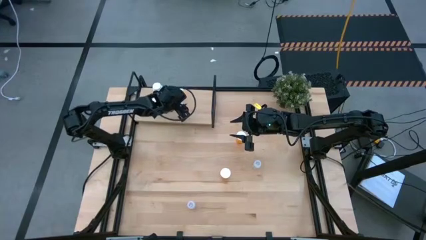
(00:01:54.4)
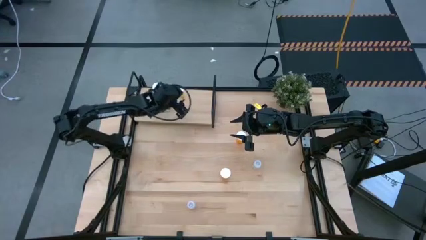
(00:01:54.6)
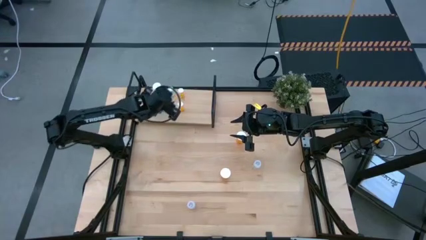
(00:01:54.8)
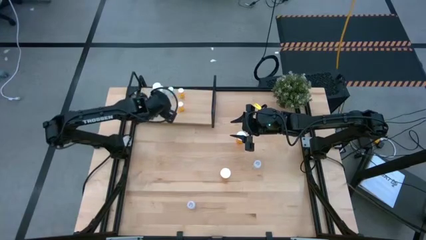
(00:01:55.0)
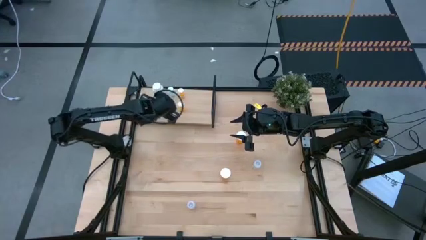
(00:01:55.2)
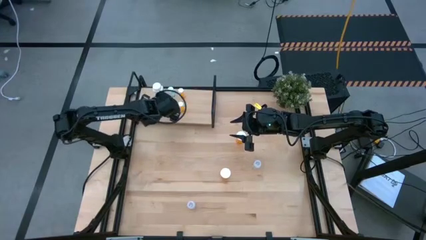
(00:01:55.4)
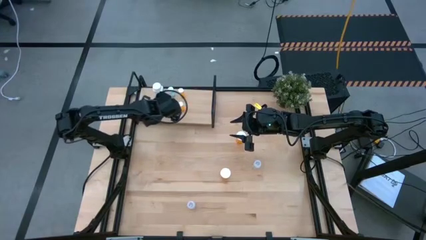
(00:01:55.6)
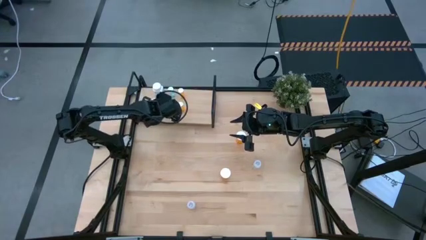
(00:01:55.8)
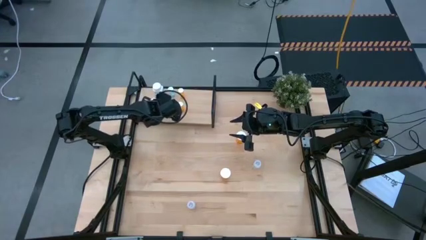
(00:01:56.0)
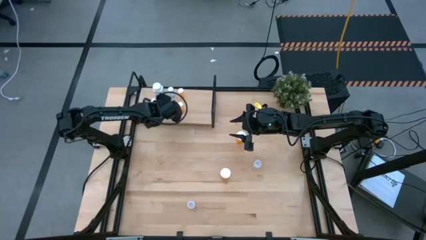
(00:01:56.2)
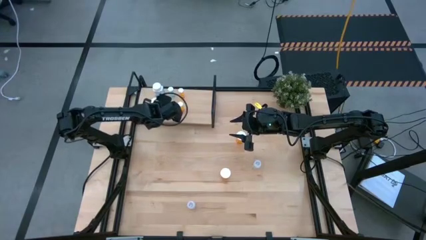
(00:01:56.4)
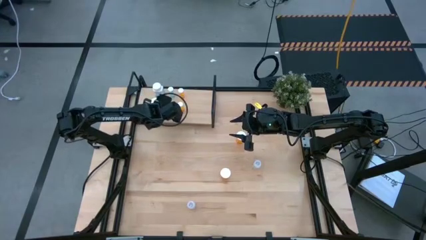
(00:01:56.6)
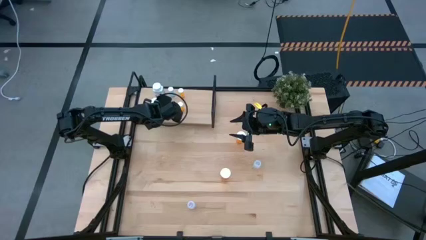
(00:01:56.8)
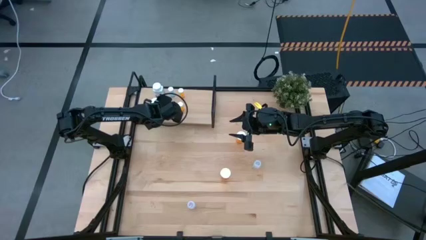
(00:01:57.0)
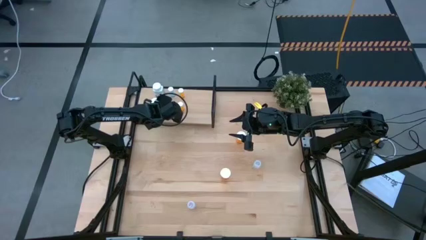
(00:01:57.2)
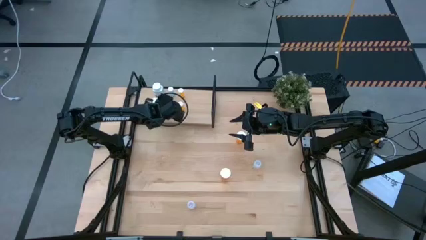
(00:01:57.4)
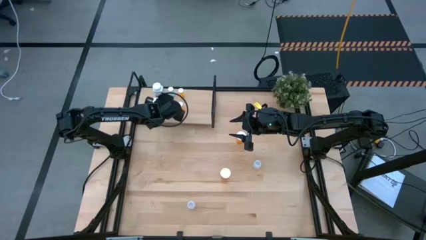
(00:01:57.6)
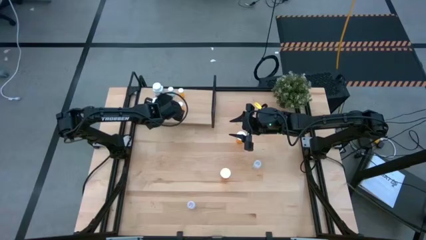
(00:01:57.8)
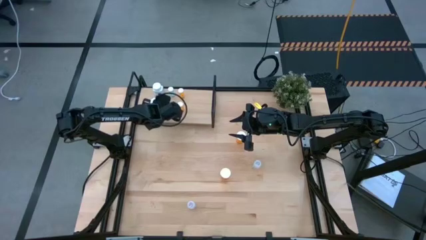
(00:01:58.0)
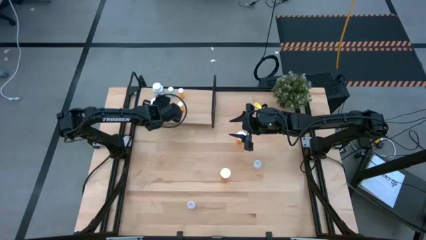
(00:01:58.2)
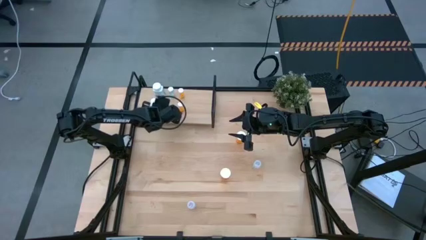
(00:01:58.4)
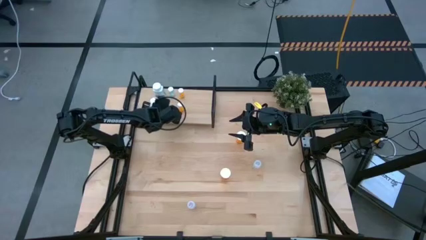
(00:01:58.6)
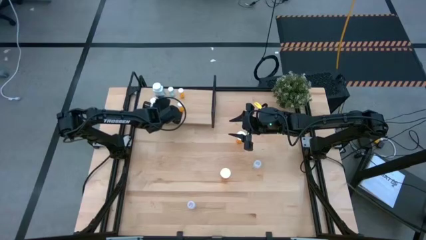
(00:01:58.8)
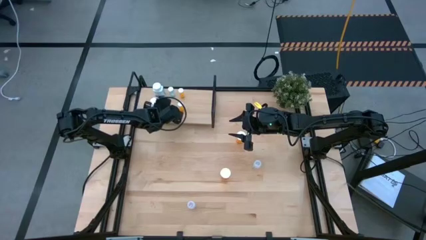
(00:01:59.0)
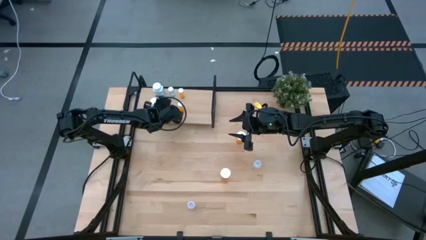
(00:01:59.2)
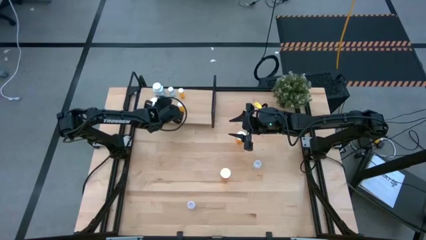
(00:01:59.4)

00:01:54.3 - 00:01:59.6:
Task: Pick and place medicine bottles onto shelf by color
Adjust the blue pill bottle on the shelf

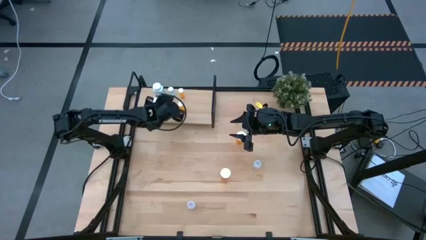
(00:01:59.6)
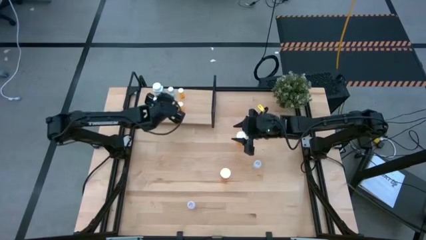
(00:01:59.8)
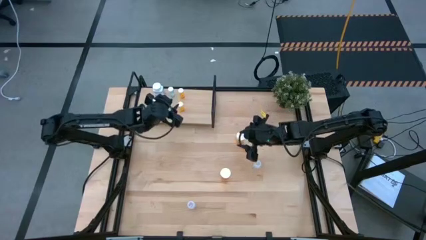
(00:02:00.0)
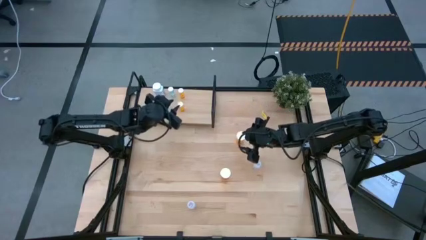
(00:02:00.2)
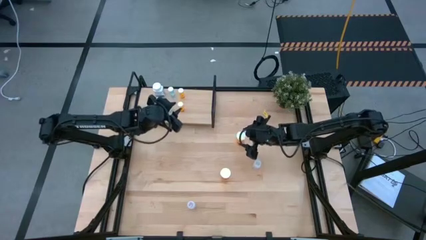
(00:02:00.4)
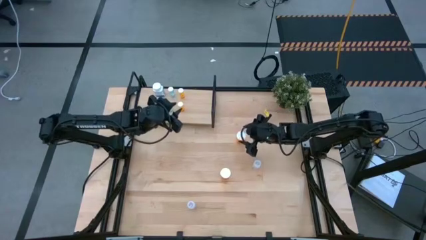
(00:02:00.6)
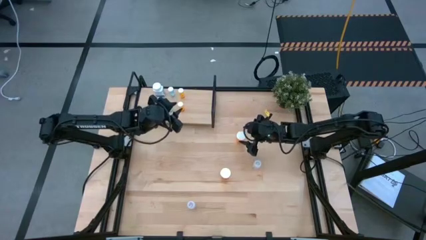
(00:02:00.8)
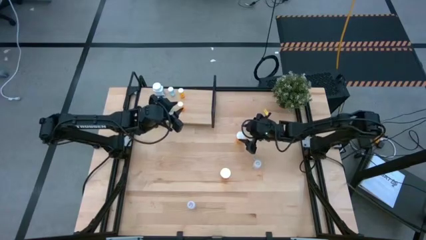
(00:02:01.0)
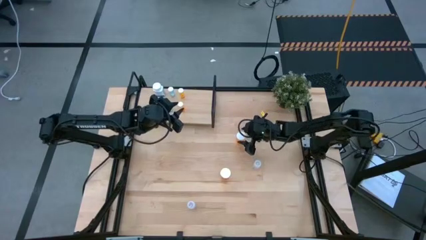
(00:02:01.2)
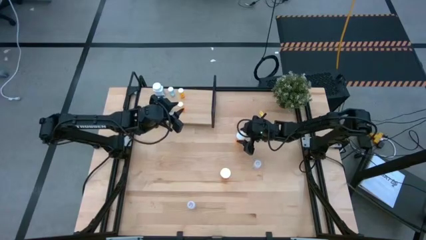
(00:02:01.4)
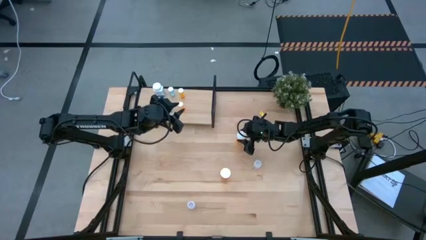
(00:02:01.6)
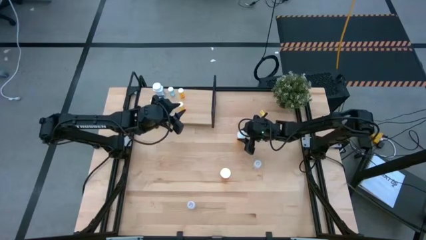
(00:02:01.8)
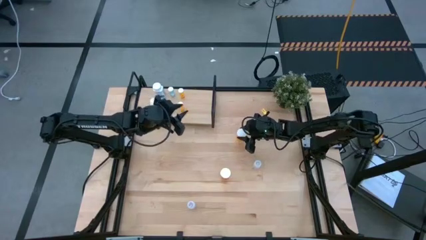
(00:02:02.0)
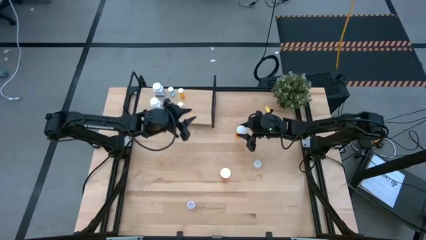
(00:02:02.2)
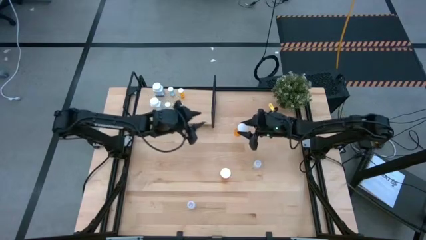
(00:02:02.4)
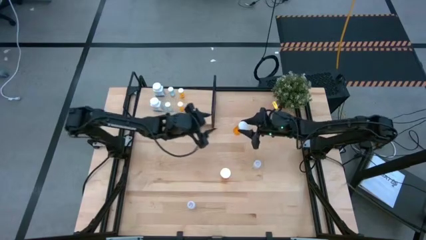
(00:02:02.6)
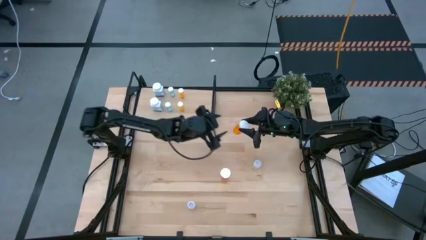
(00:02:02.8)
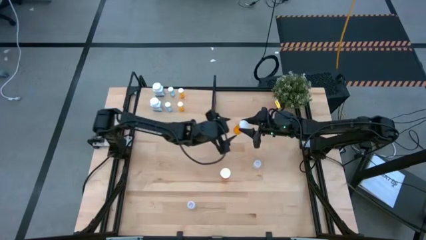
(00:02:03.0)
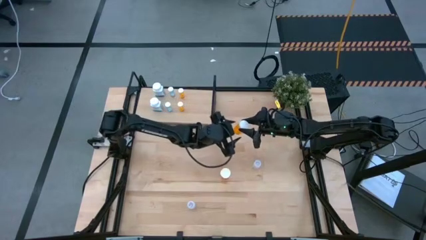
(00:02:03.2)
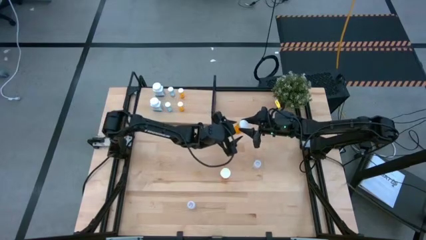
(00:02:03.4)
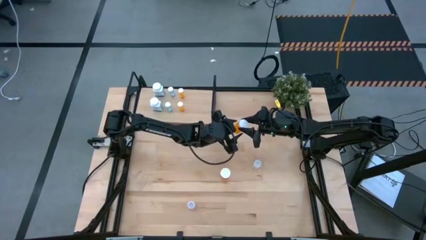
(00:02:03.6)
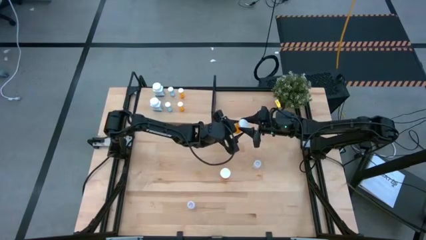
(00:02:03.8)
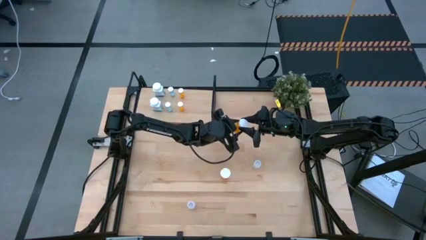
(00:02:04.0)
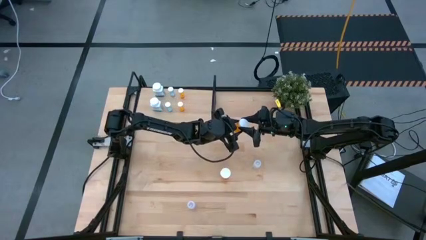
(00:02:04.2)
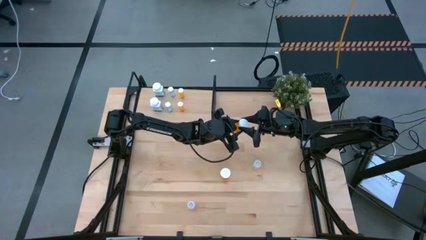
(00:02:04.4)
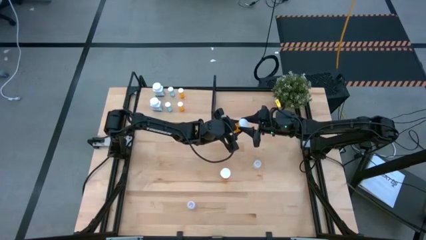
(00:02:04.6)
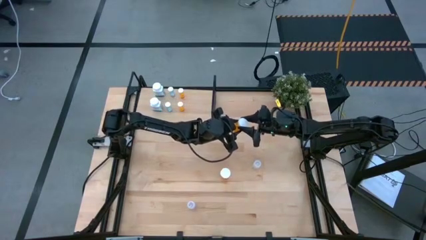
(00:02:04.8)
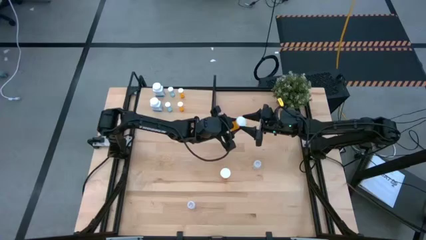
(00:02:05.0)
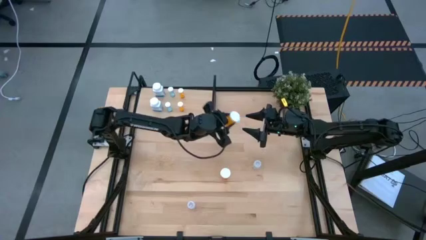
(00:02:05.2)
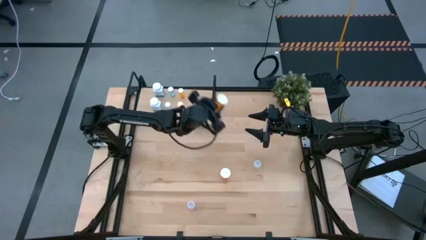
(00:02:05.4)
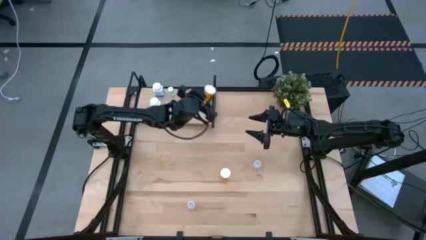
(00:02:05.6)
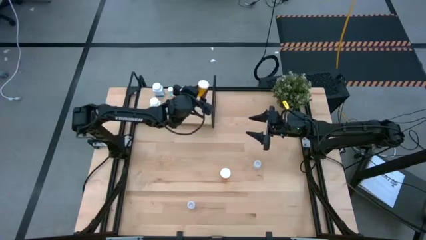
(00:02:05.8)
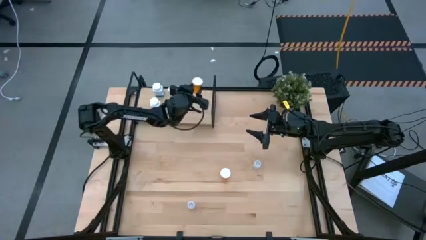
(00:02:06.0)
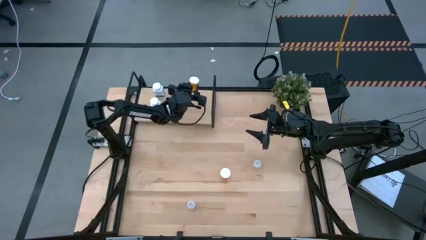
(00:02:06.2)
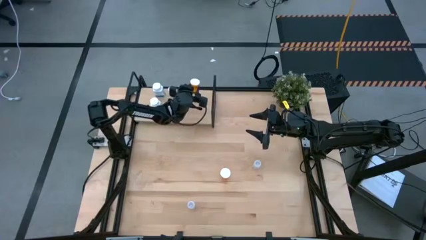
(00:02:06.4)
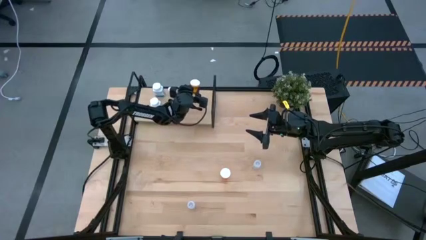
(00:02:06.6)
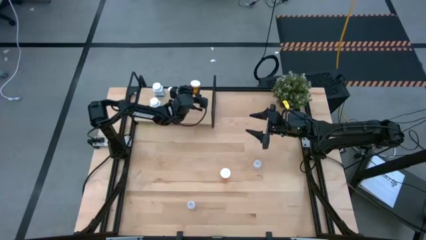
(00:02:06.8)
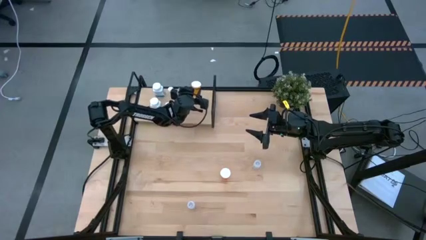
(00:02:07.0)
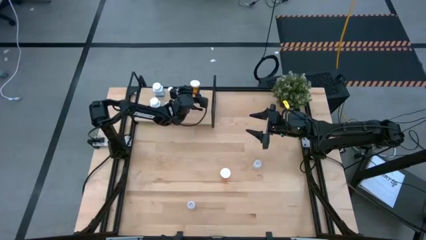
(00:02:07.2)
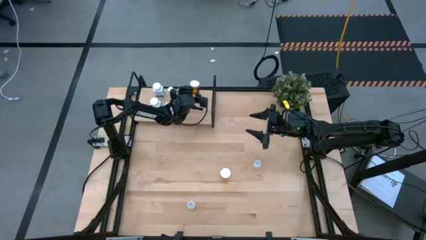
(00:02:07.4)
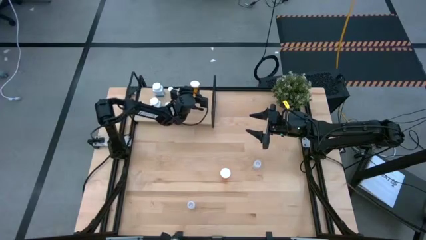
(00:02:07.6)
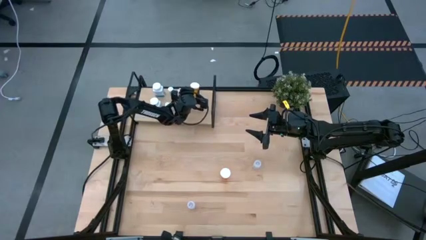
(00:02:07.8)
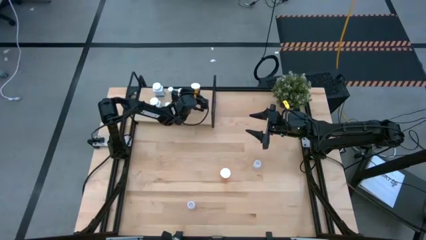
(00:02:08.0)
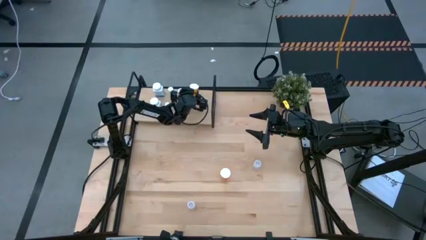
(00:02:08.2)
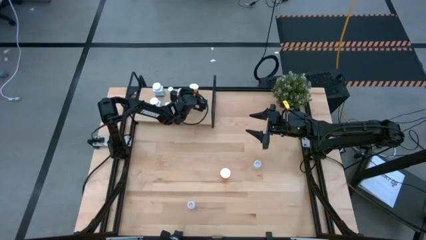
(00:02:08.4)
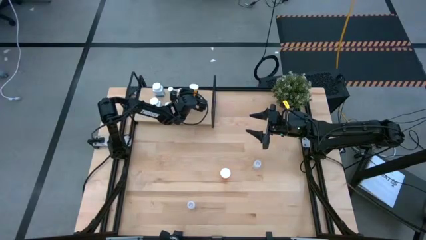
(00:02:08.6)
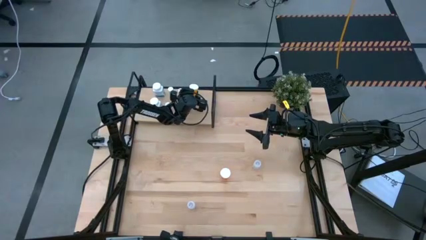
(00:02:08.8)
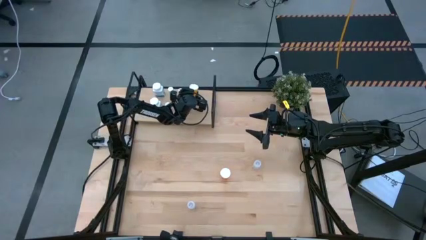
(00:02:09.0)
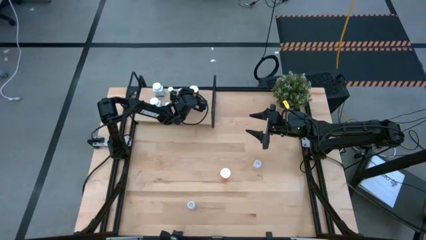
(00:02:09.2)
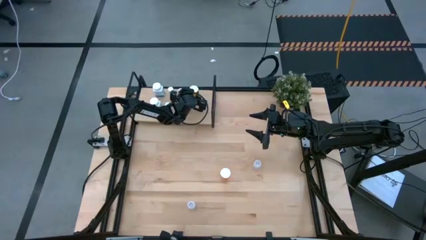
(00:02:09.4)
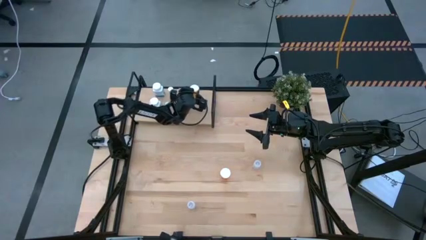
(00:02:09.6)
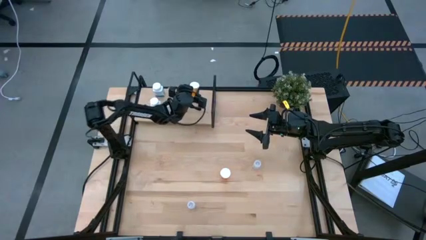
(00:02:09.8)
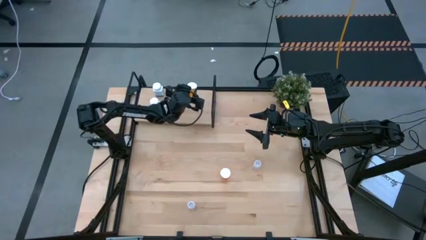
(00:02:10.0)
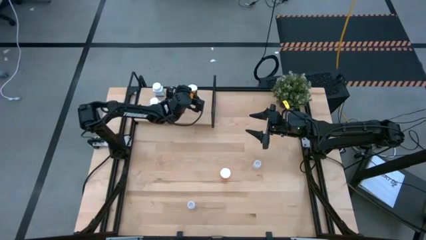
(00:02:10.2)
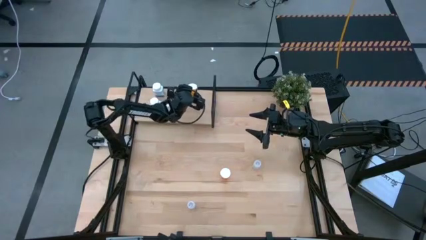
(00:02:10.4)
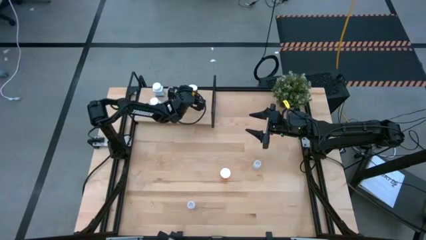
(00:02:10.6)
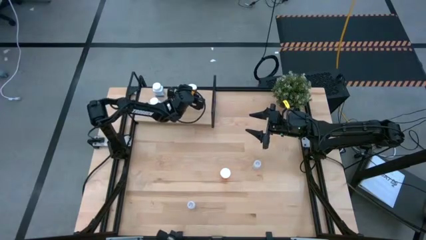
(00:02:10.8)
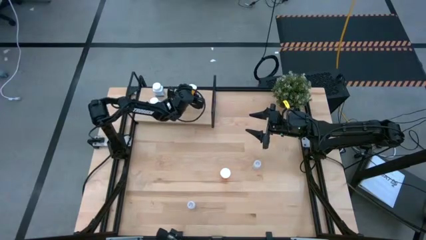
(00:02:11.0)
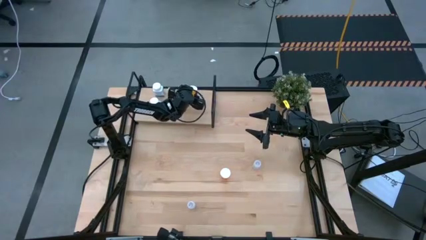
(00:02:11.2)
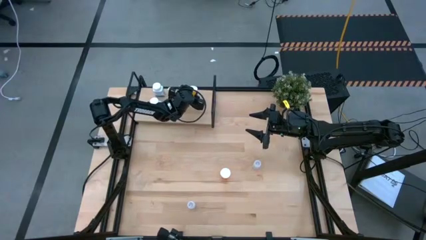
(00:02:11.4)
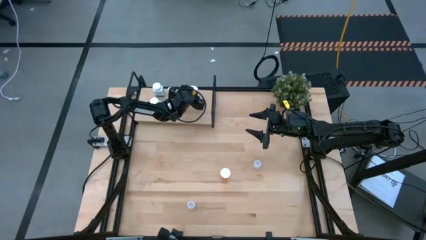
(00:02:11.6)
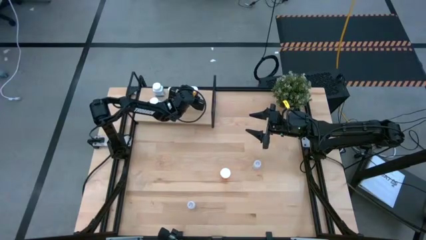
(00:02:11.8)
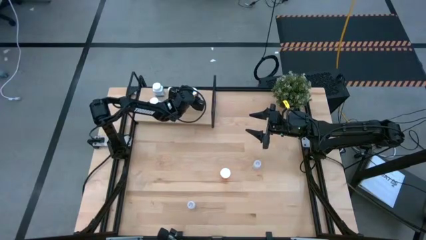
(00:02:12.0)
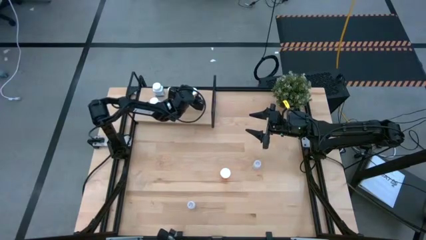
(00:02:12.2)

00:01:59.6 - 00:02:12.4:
Put the top large orange pill bottle on the shelf
